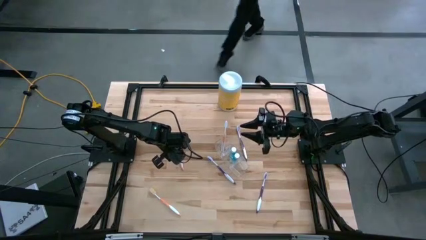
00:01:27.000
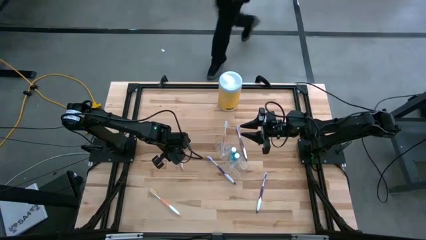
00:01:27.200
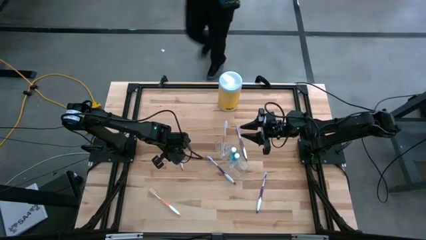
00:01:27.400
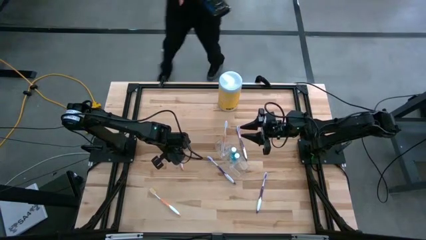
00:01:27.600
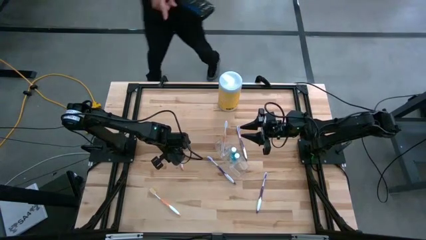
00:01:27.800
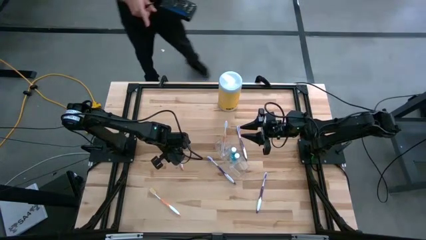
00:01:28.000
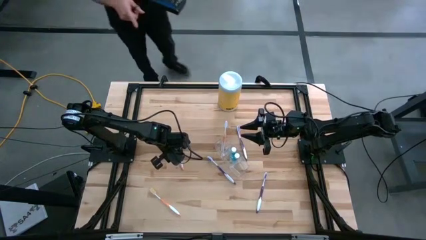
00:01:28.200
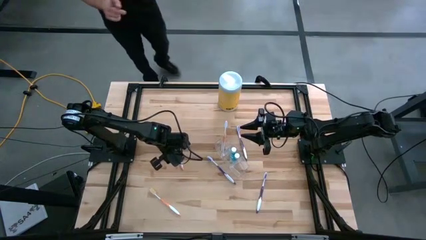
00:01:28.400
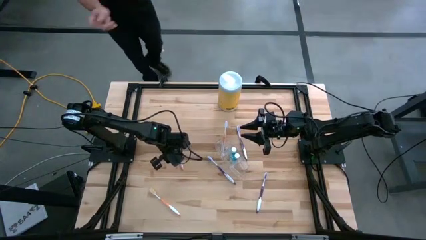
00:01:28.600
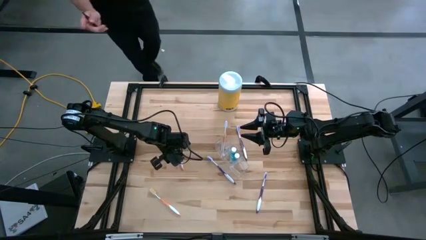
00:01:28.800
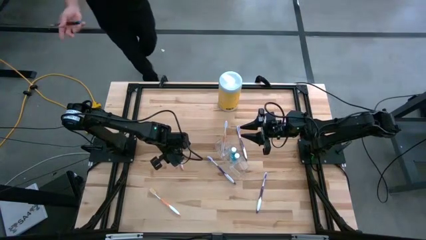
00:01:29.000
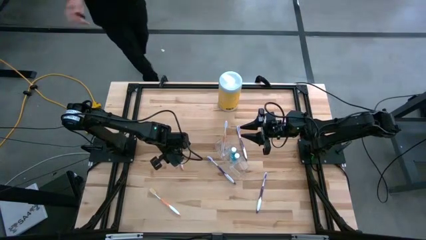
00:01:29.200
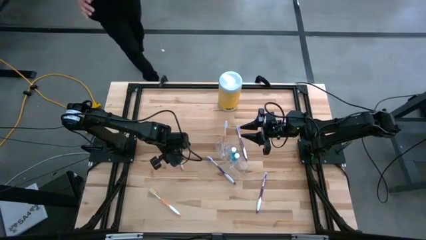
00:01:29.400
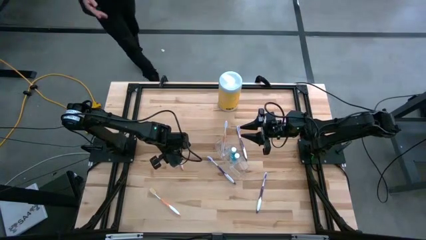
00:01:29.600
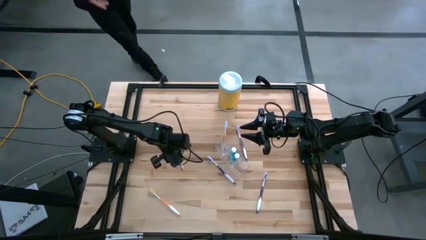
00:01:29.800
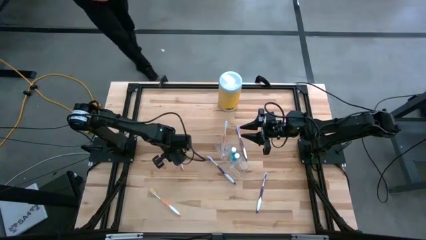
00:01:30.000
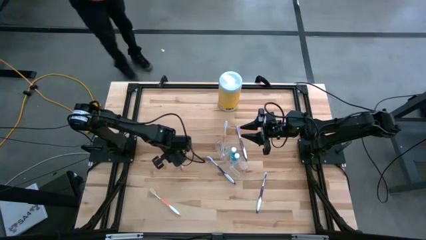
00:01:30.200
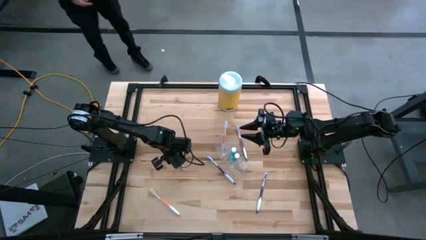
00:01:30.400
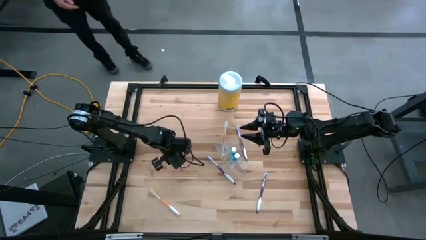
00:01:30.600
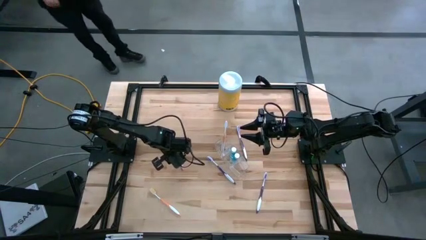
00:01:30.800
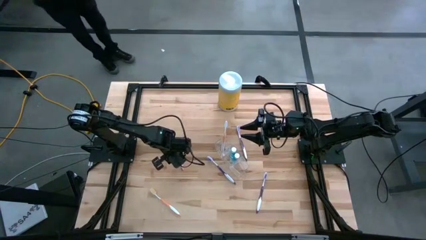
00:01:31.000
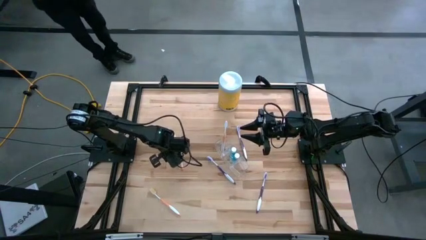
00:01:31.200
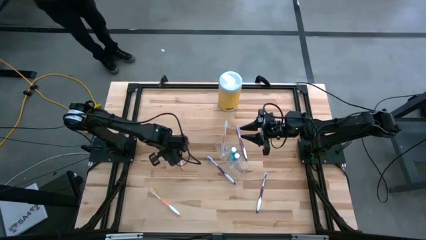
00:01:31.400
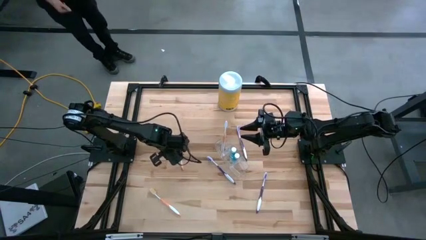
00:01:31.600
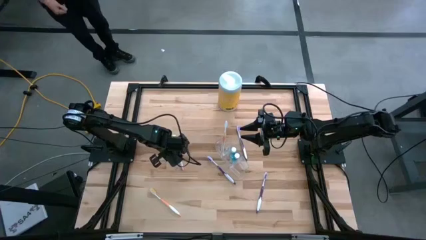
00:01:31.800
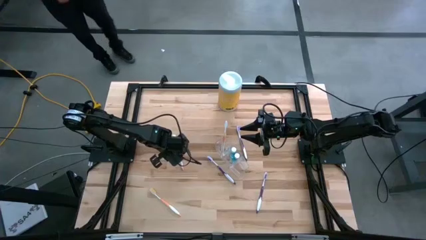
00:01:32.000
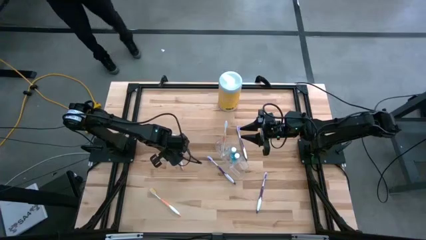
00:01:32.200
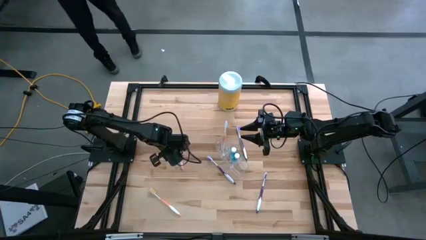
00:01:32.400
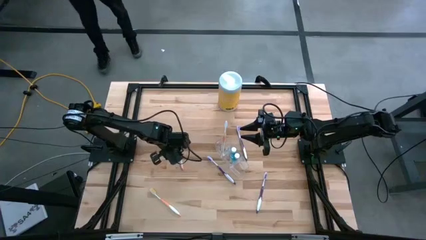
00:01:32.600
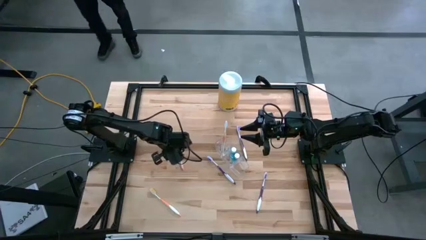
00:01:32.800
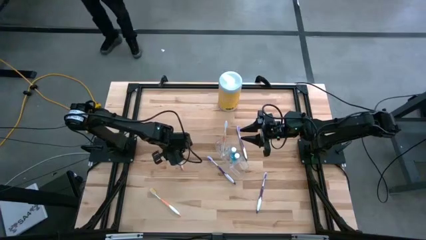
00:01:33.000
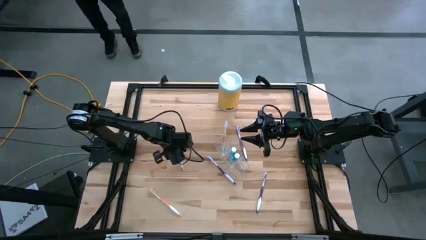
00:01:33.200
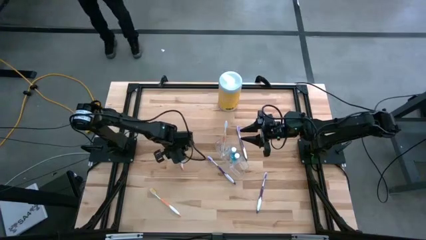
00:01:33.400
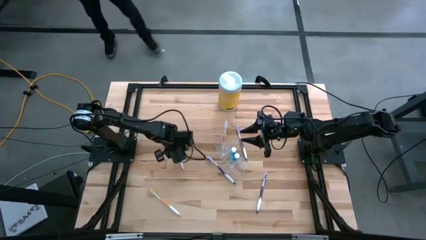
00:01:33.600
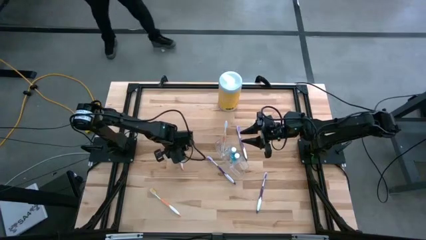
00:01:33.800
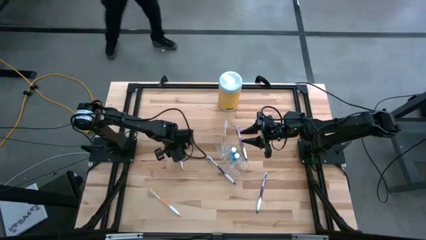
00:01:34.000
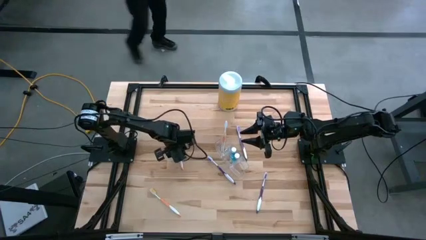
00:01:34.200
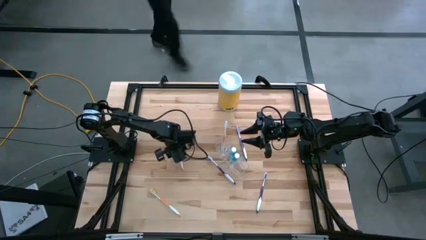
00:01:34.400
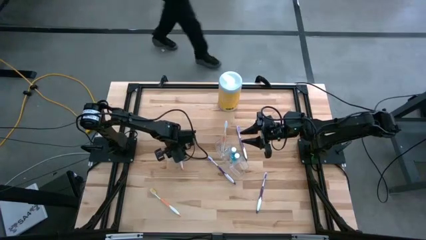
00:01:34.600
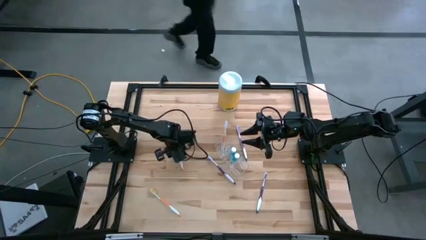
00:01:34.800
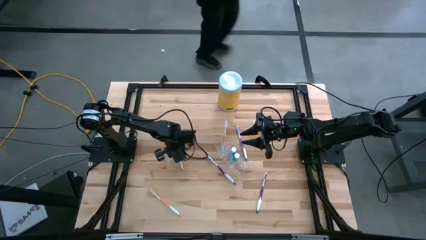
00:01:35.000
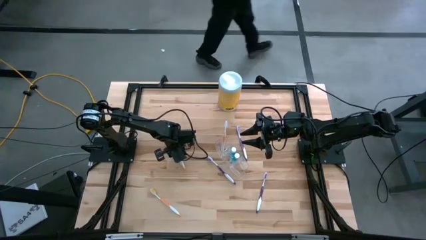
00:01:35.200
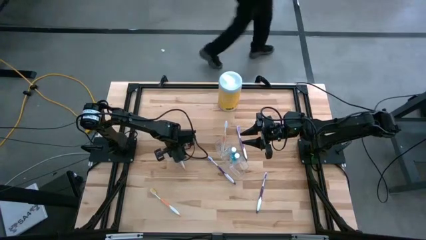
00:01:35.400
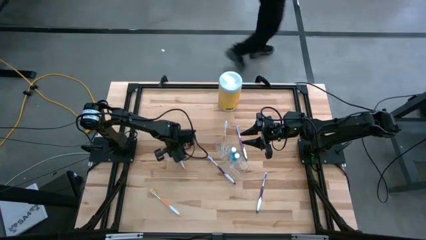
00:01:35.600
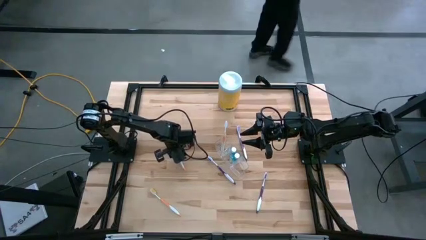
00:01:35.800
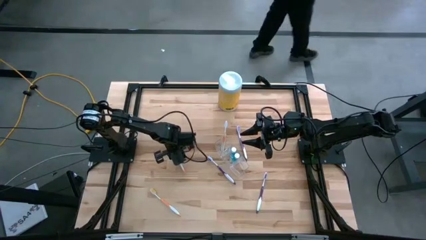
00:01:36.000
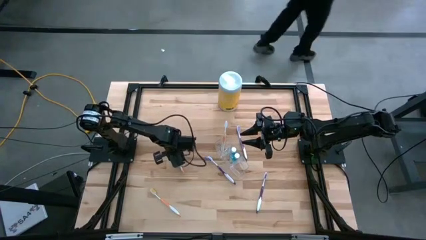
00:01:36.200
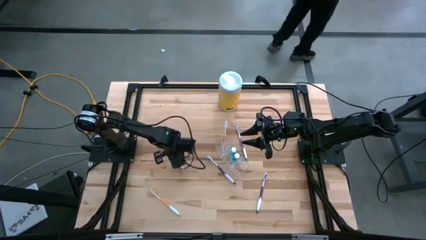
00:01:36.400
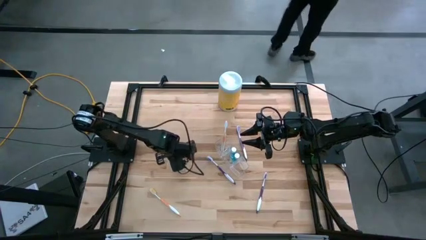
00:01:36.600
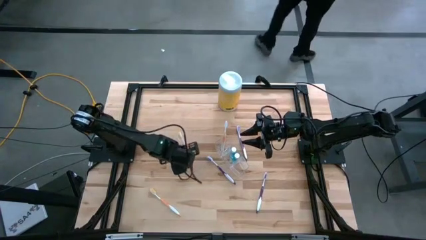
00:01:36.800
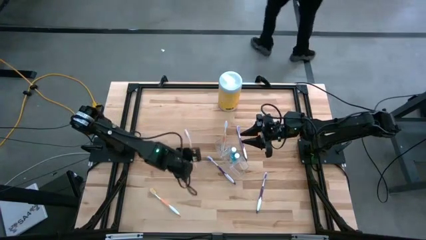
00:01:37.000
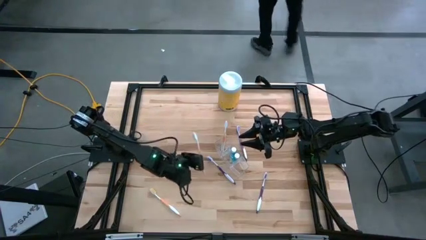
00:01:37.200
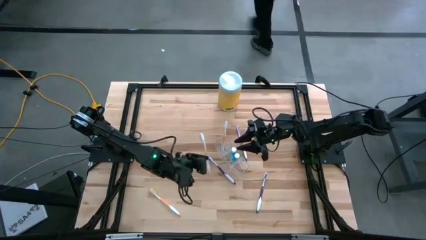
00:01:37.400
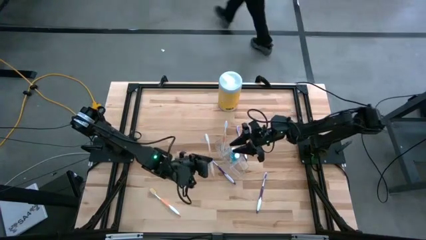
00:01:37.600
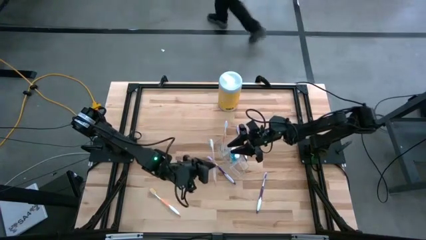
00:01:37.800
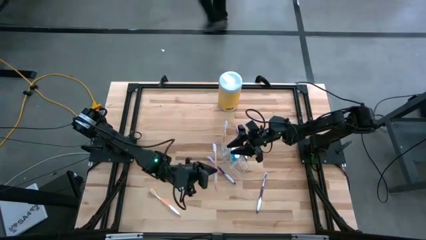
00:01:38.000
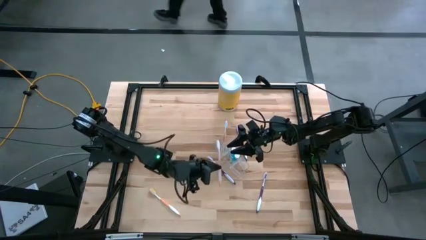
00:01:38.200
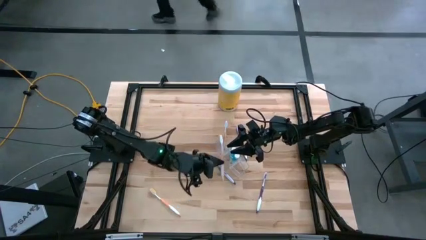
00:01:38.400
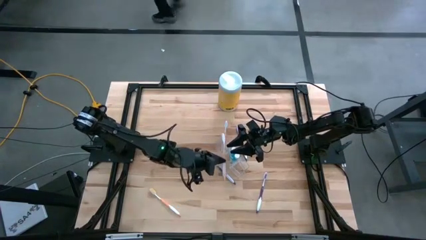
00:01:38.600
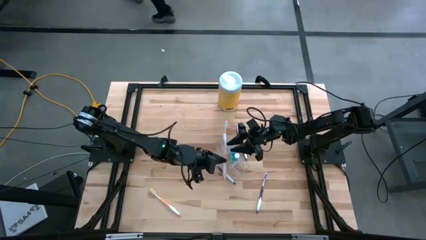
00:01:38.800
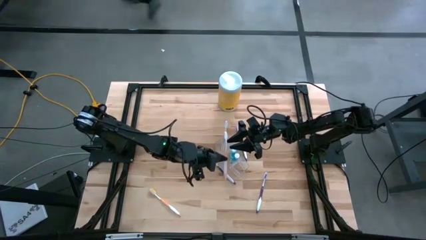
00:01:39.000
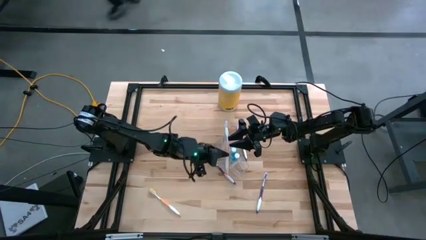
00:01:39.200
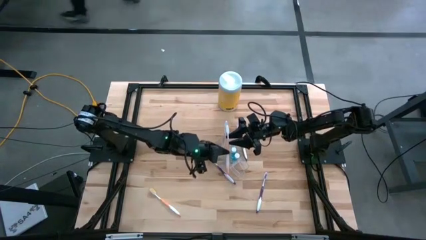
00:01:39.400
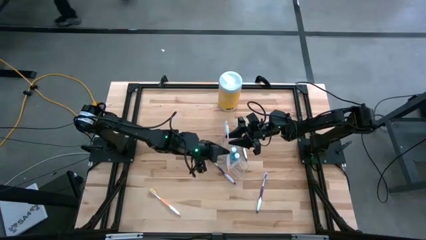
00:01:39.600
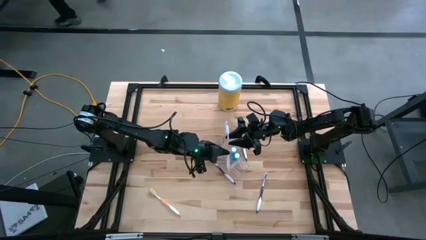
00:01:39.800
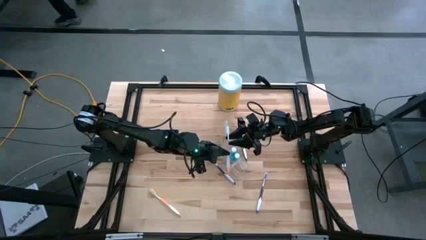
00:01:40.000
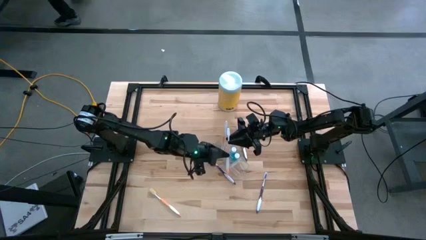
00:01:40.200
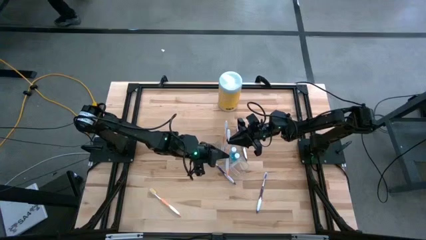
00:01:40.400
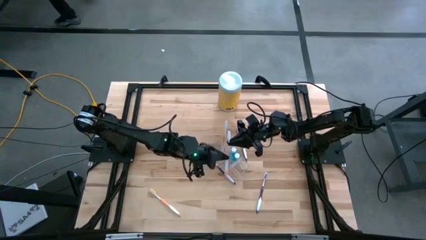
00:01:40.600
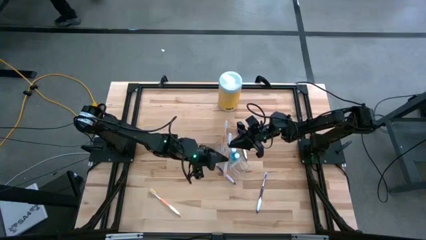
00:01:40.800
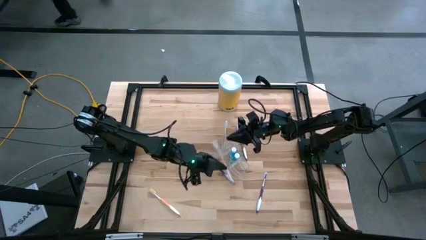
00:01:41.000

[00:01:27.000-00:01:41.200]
Task: Pick & Place toothbrushing station
Put the top orange toothbrush into the top compartment of the transparent organizer
